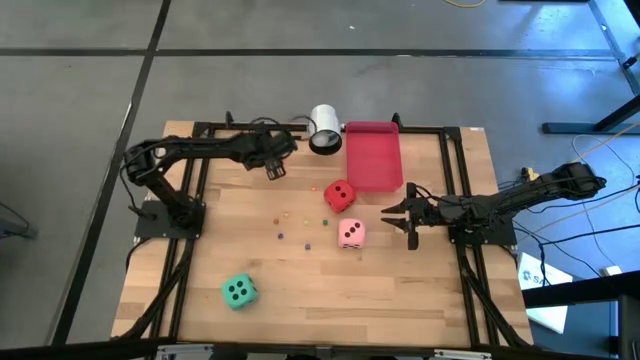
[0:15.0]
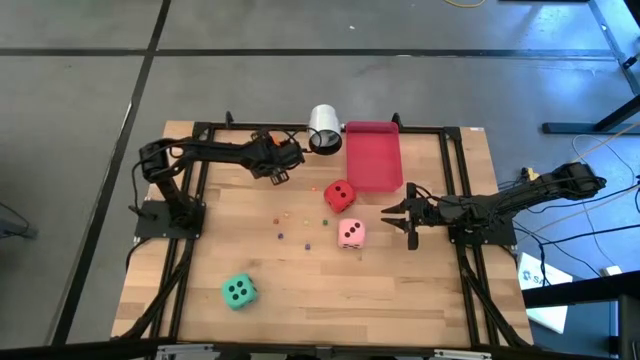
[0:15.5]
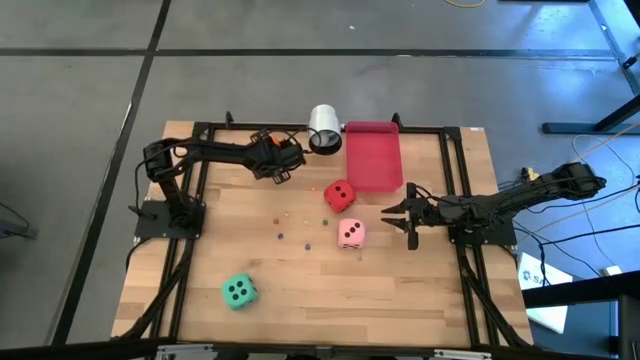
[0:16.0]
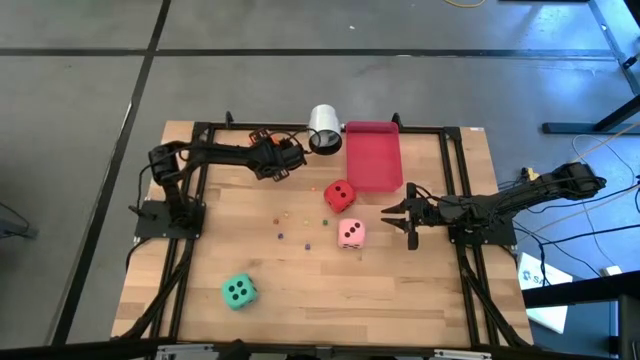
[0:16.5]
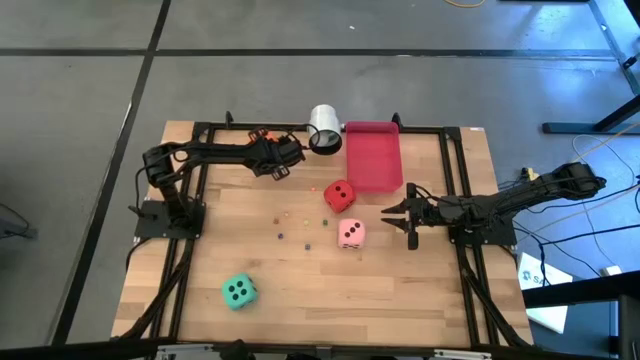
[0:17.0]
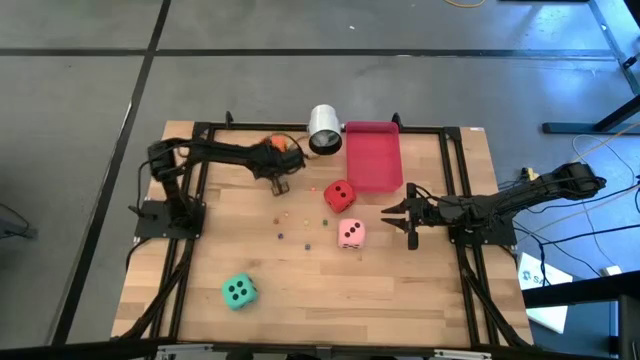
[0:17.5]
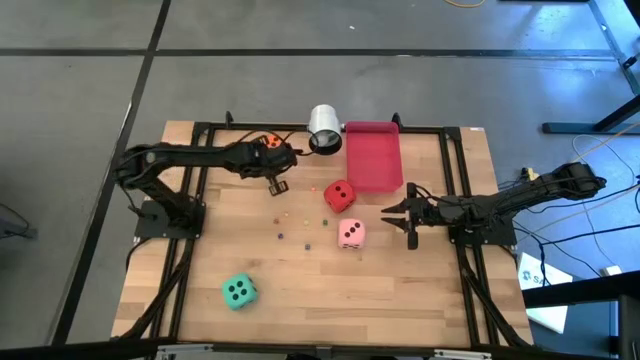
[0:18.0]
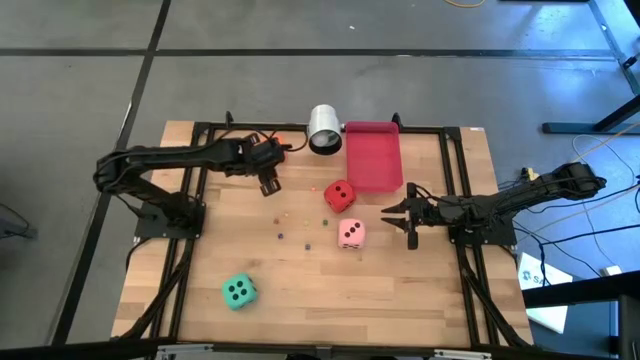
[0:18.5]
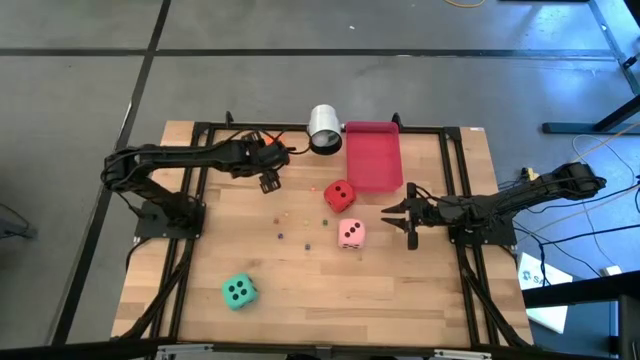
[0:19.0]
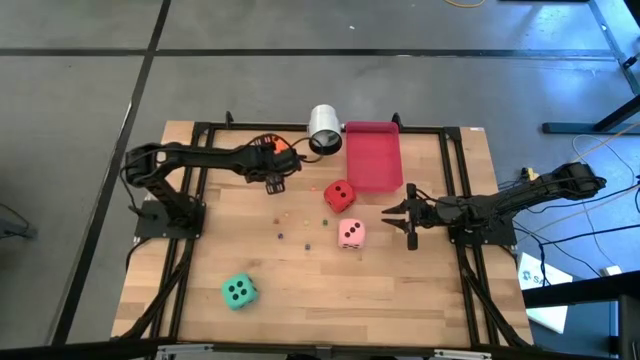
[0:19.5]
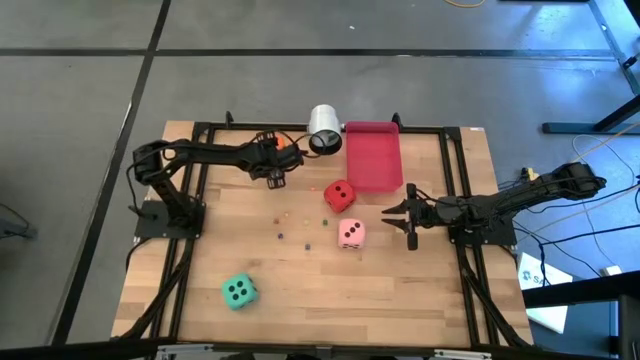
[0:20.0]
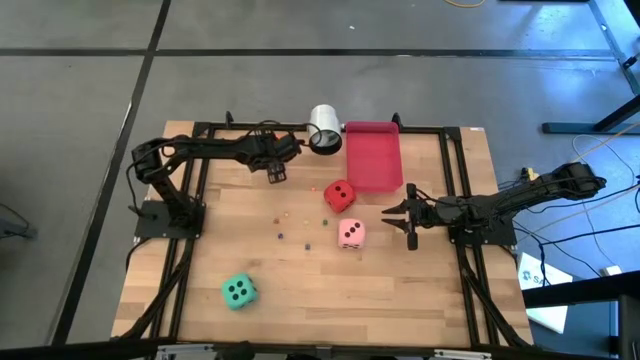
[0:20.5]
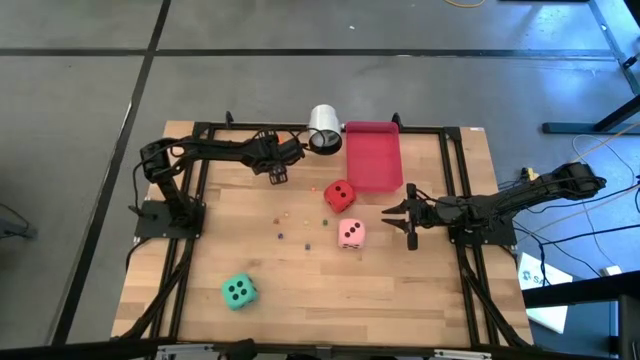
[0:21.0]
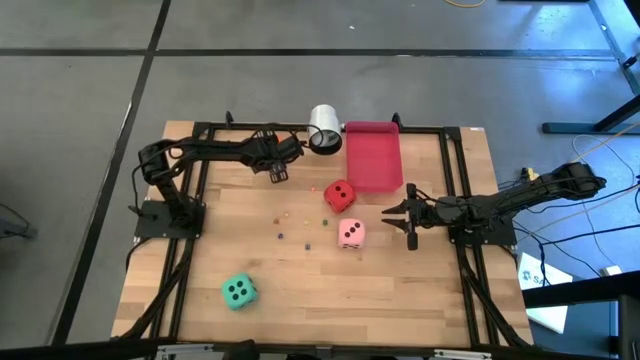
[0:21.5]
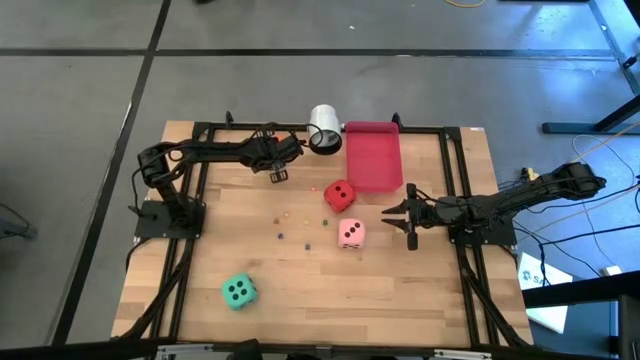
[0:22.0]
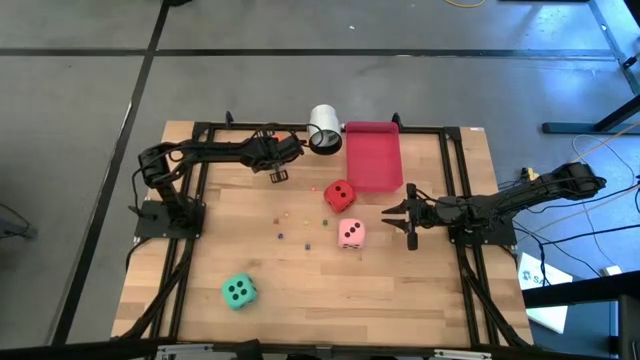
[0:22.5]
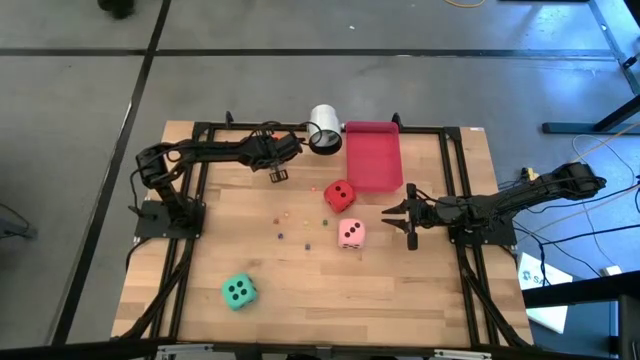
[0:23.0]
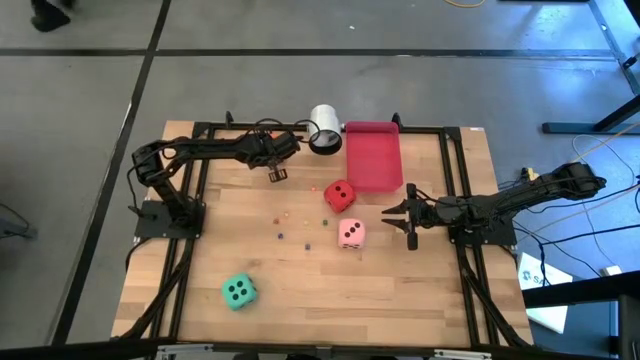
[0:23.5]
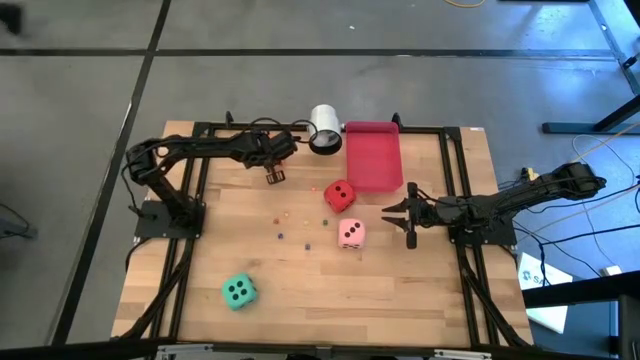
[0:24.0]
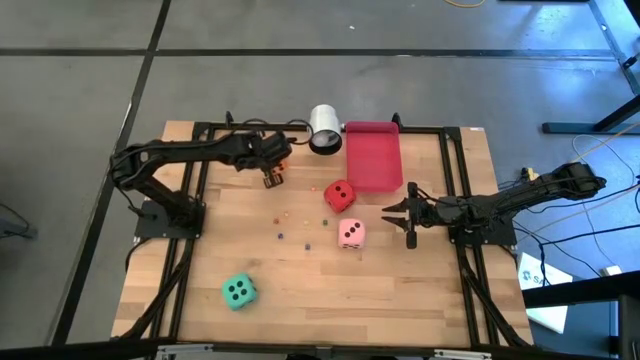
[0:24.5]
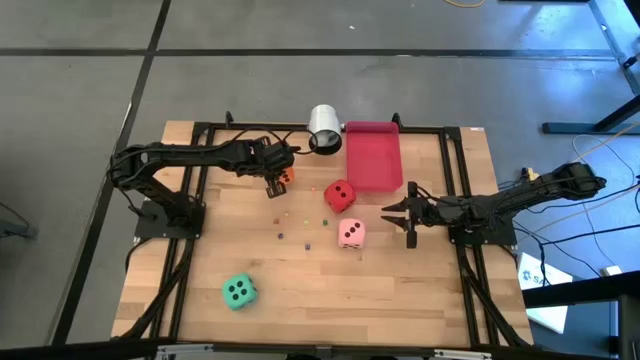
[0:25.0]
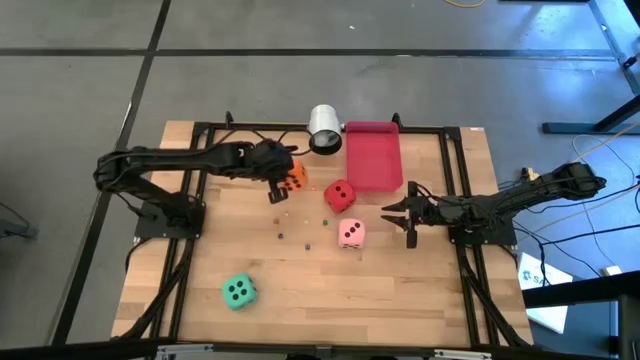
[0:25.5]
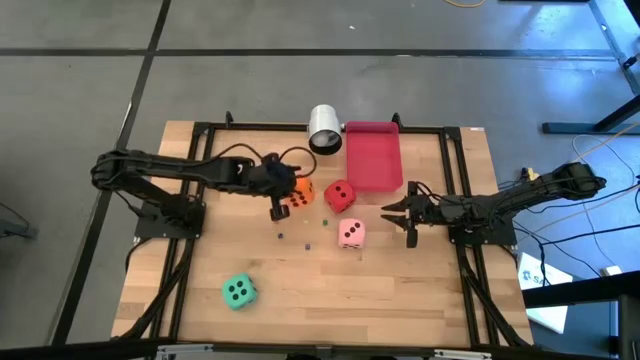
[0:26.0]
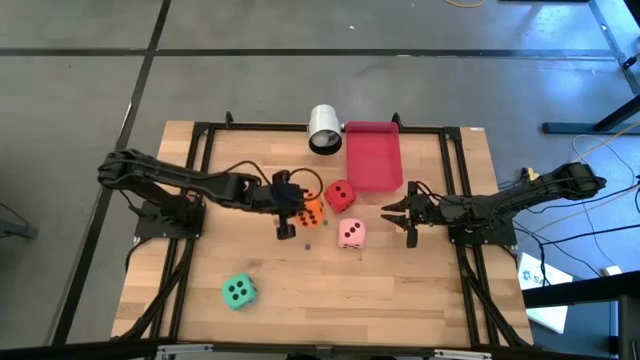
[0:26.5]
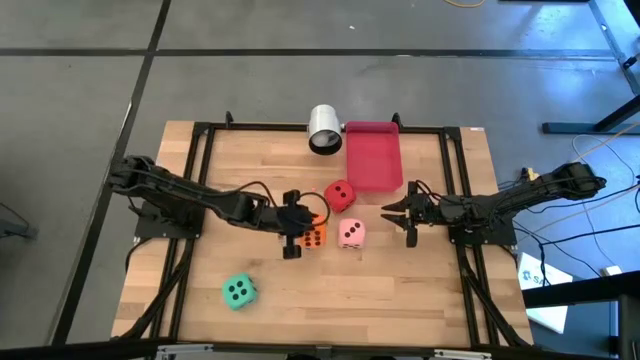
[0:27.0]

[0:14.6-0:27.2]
Task: Pick & Place Dice
Put the big orange dice into the red bin

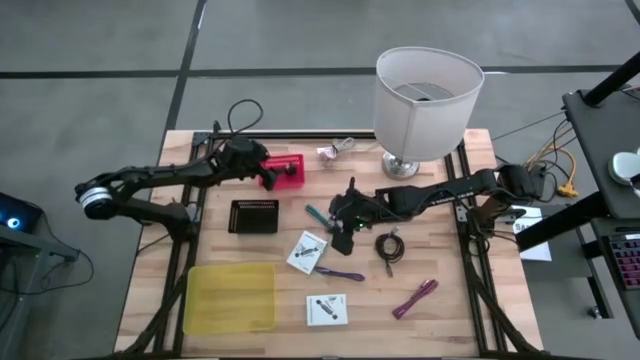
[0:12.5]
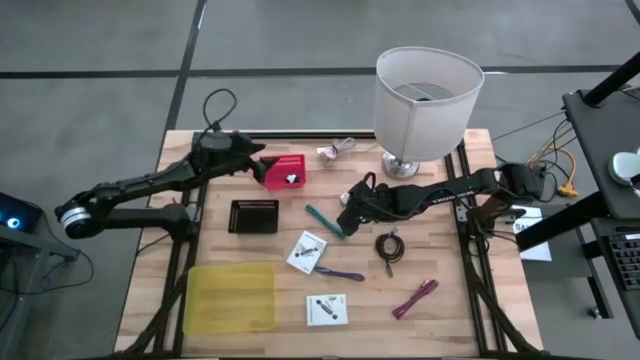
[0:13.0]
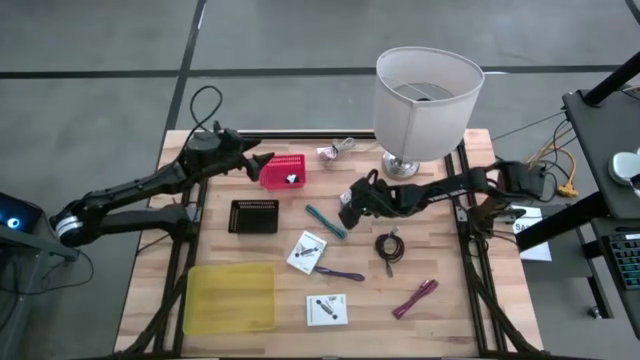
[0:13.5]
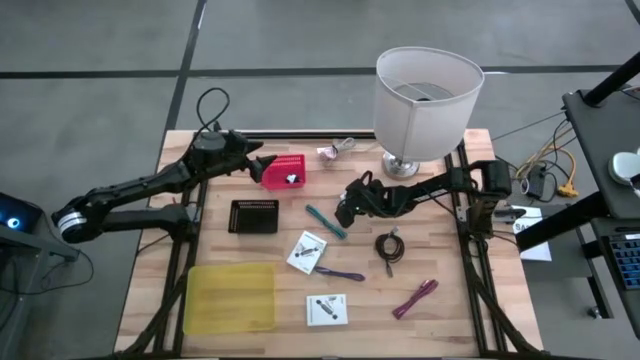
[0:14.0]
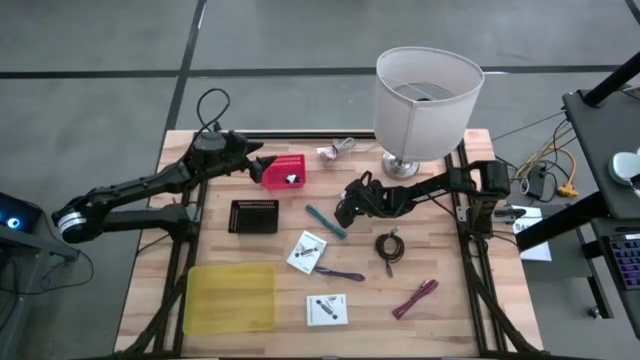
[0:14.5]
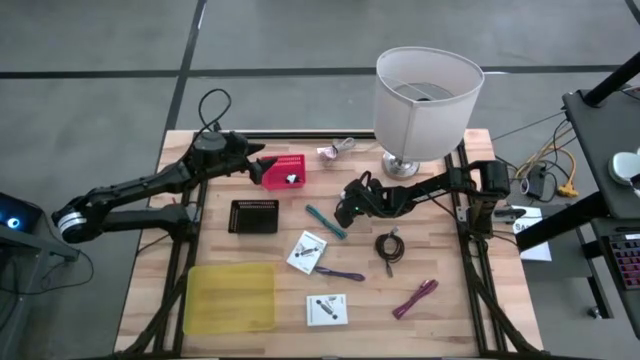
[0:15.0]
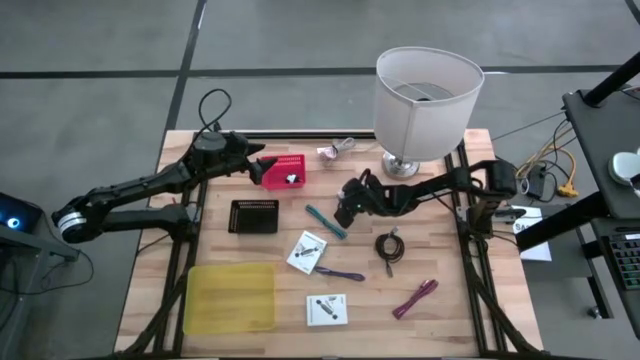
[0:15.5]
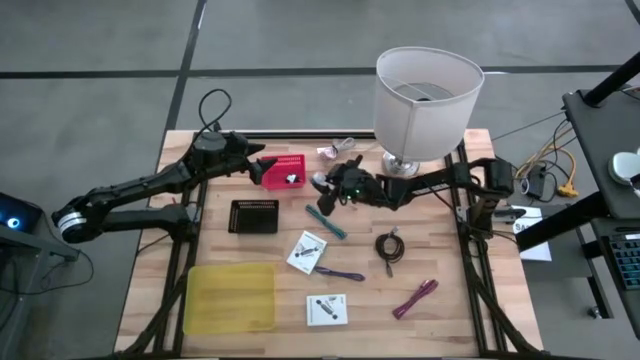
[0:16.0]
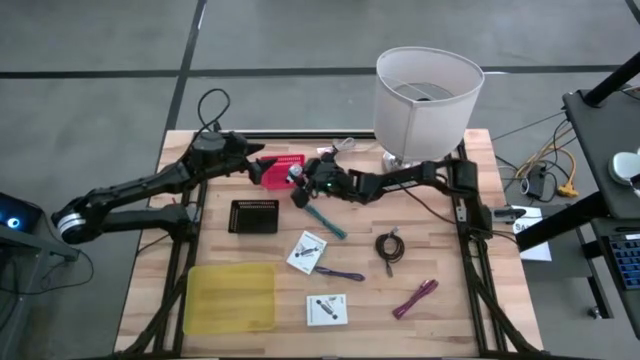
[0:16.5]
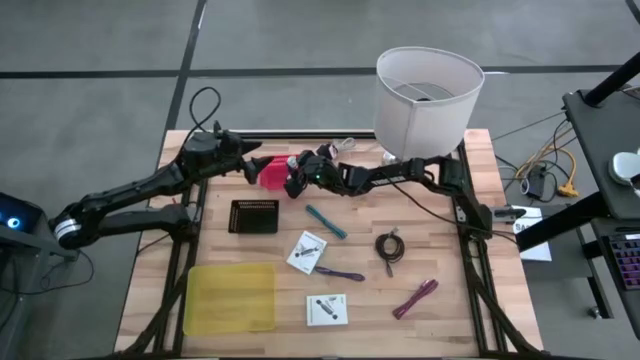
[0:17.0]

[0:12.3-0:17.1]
Task: Pick and place items into bin
Put the blue charger adapter into the red bin

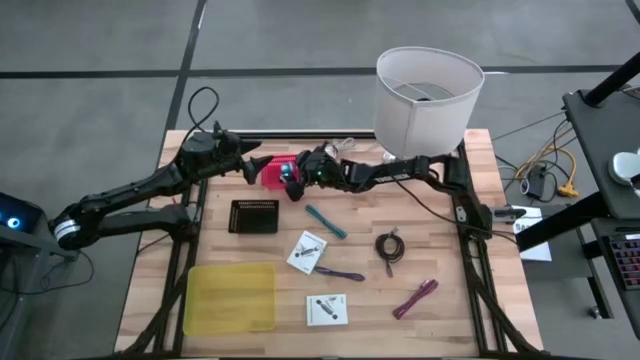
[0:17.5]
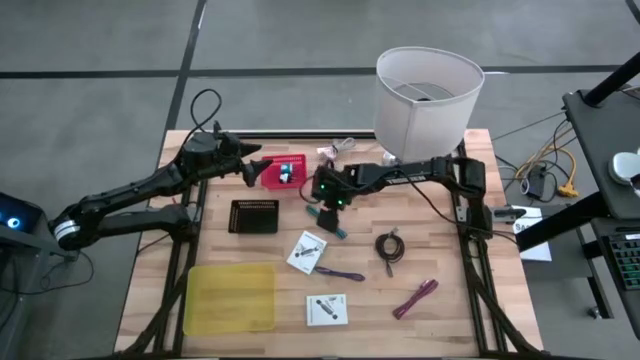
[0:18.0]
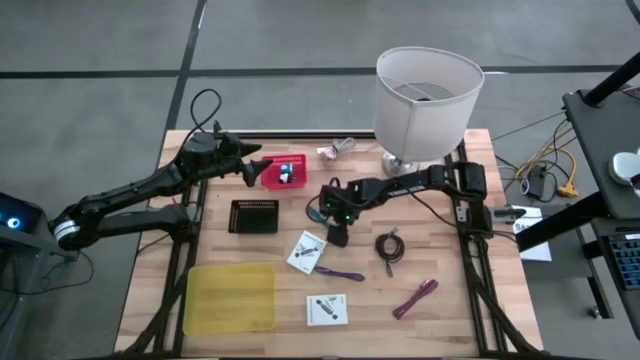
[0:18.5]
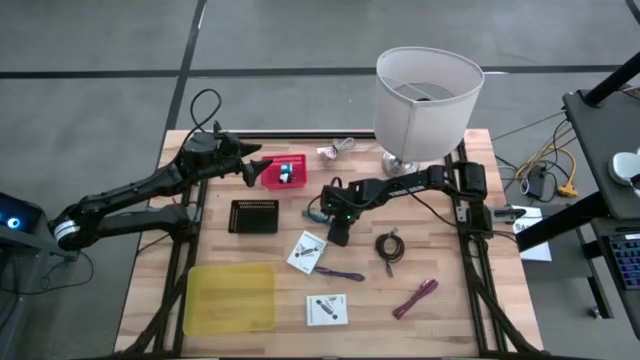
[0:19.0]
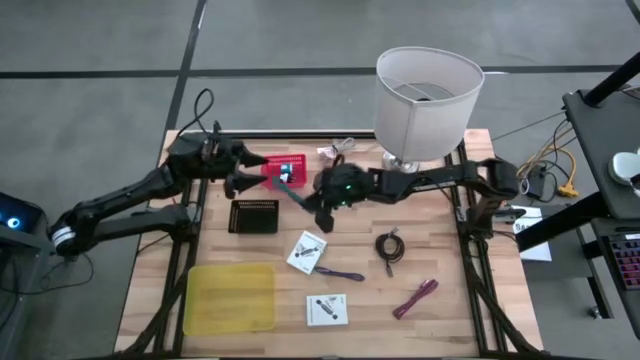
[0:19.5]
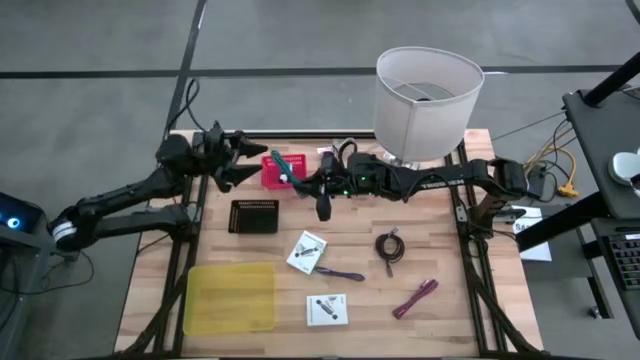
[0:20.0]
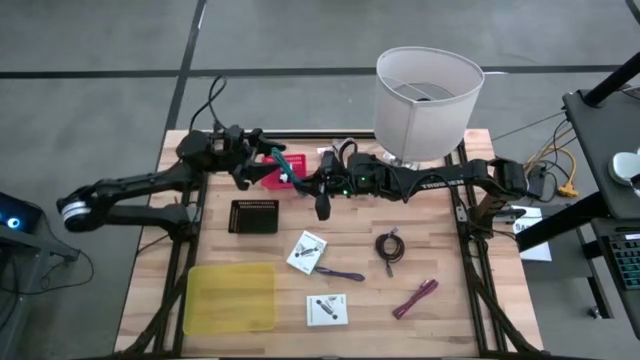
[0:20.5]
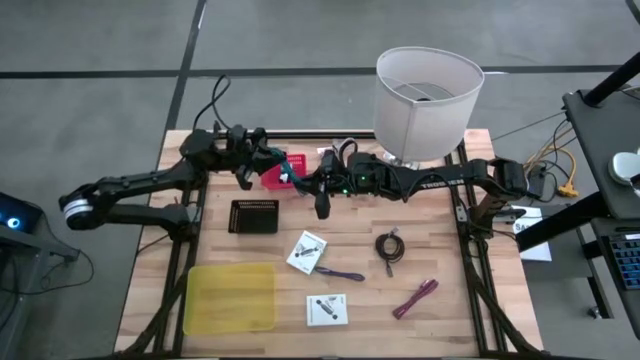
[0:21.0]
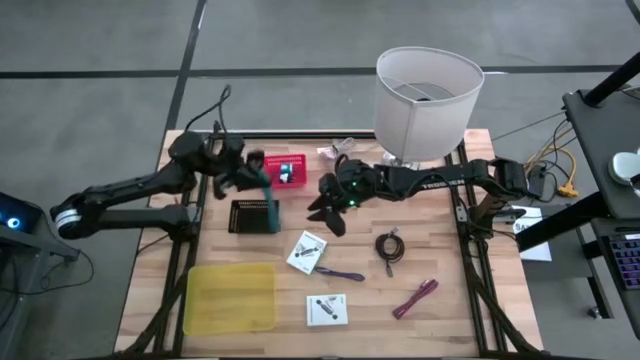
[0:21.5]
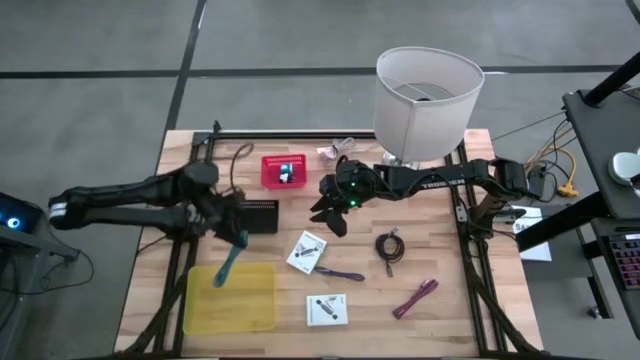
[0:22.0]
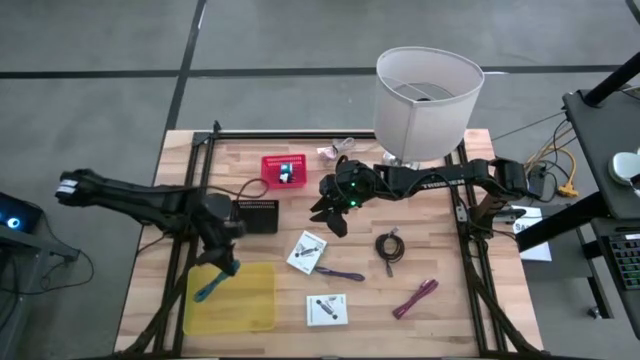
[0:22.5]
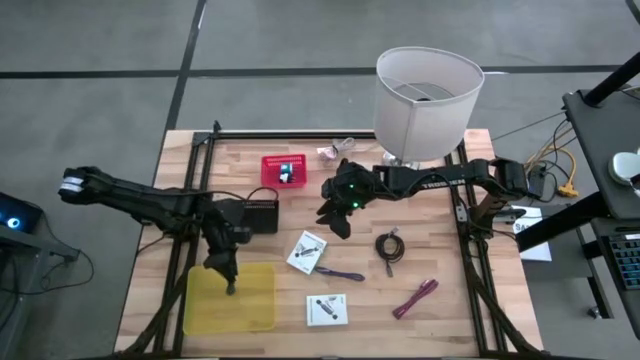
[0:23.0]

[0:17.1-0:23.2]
Put the blue charger cable into the yellow bin
